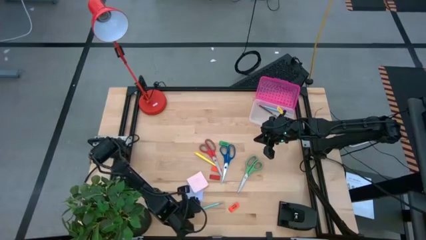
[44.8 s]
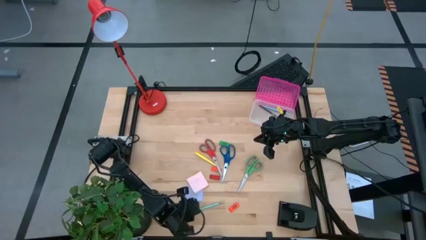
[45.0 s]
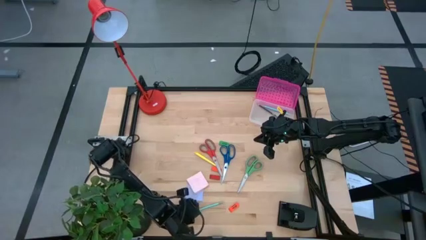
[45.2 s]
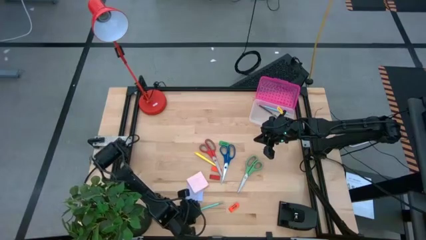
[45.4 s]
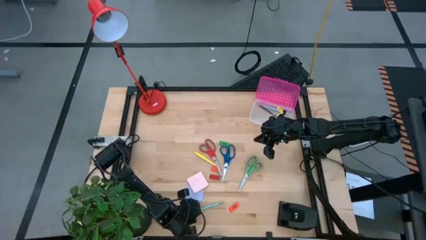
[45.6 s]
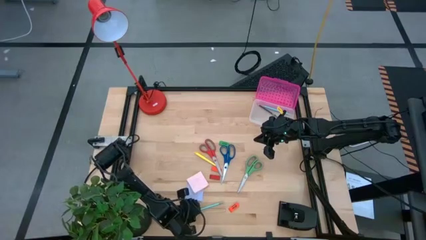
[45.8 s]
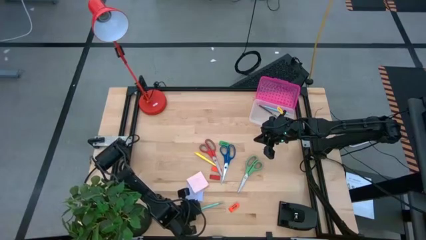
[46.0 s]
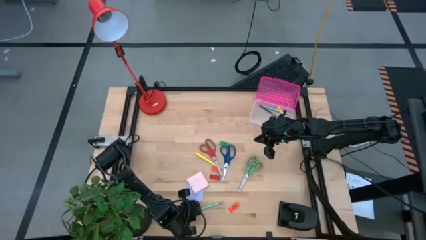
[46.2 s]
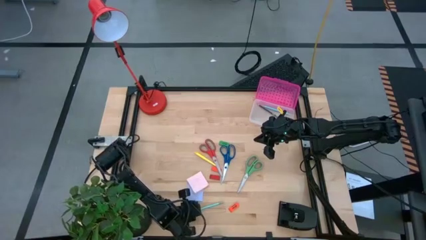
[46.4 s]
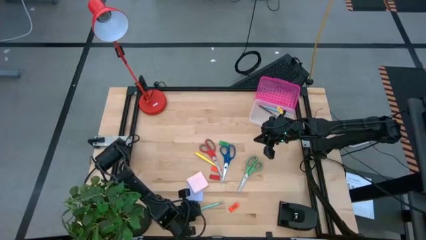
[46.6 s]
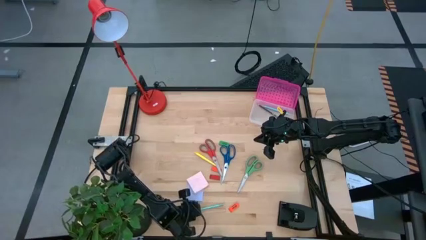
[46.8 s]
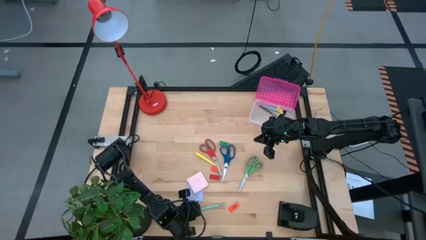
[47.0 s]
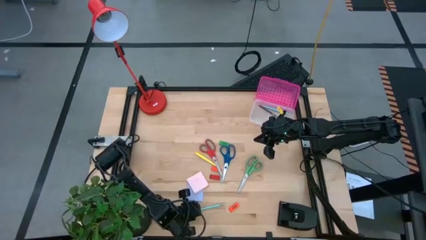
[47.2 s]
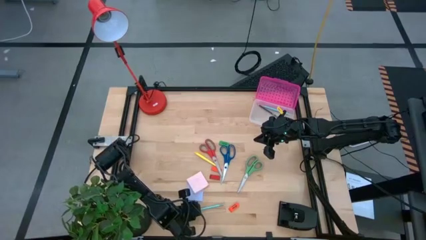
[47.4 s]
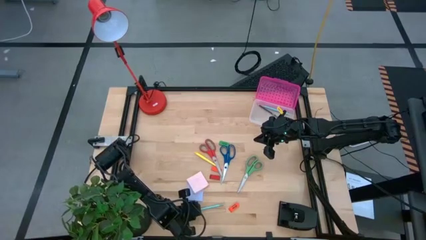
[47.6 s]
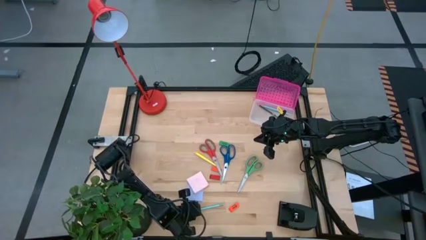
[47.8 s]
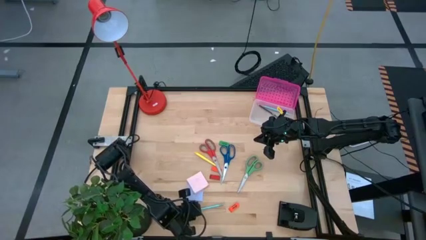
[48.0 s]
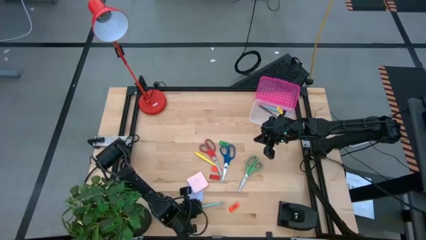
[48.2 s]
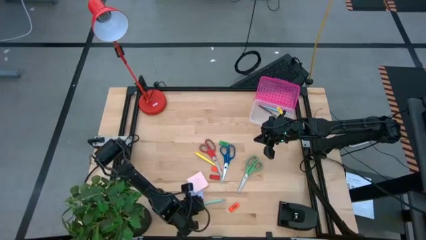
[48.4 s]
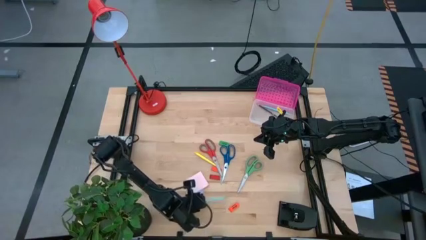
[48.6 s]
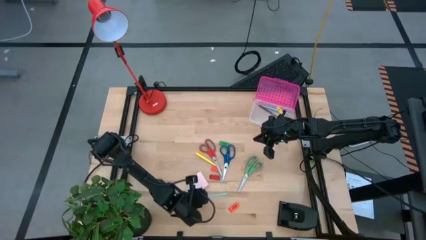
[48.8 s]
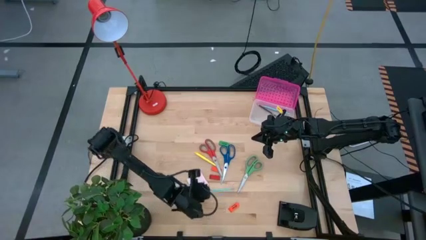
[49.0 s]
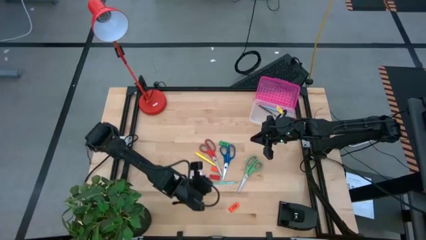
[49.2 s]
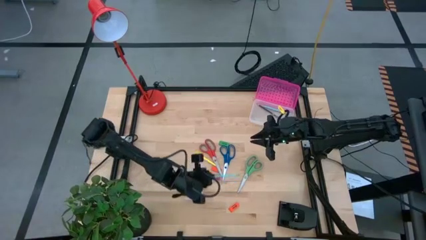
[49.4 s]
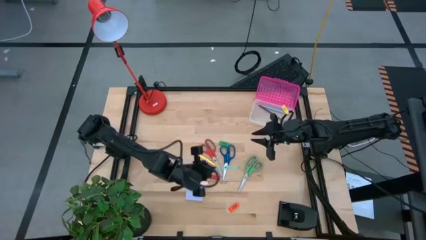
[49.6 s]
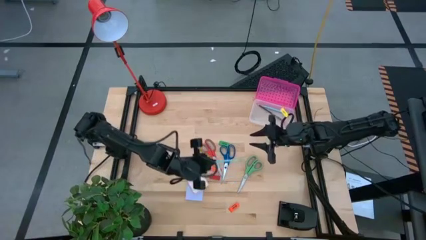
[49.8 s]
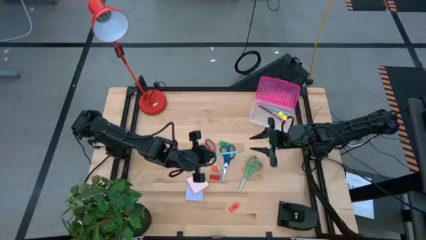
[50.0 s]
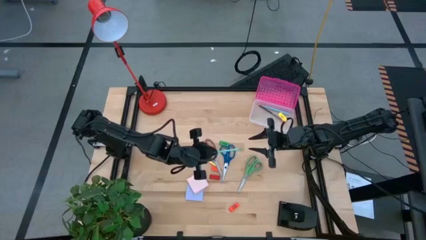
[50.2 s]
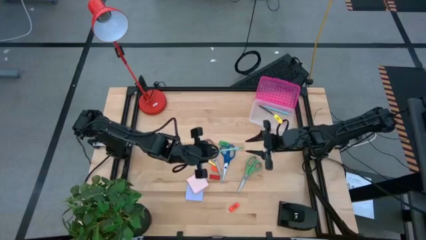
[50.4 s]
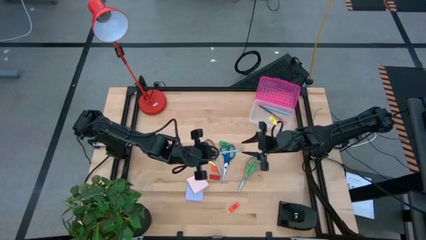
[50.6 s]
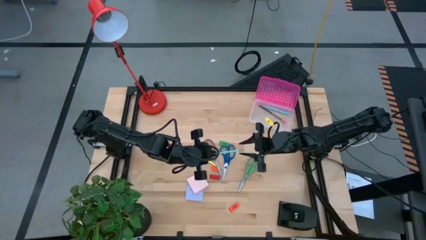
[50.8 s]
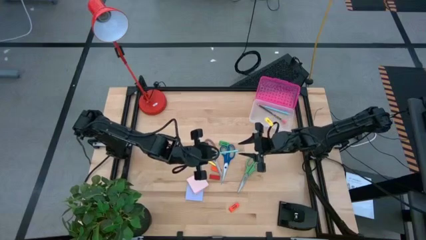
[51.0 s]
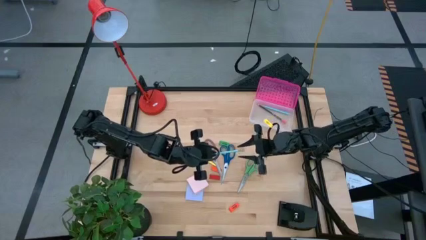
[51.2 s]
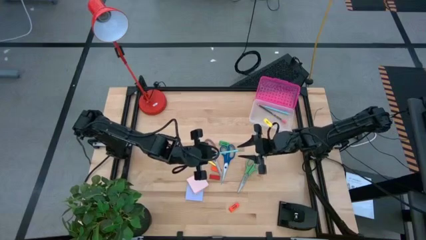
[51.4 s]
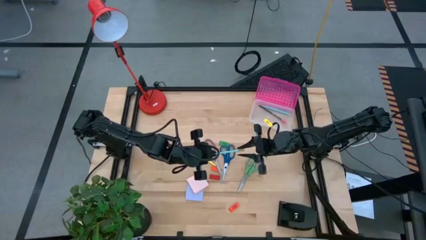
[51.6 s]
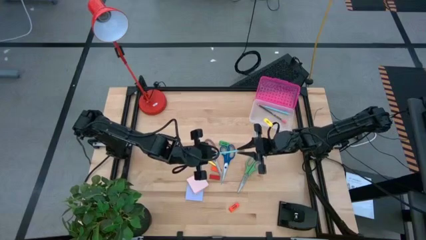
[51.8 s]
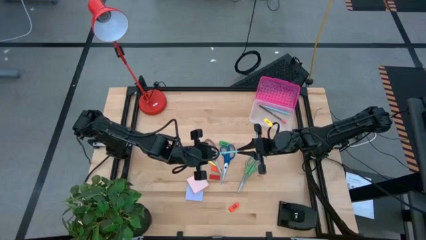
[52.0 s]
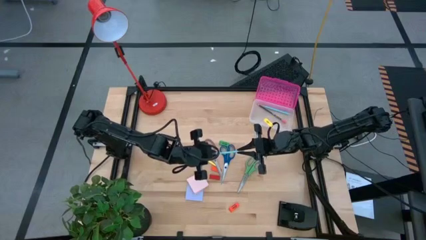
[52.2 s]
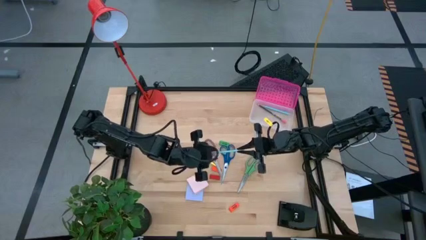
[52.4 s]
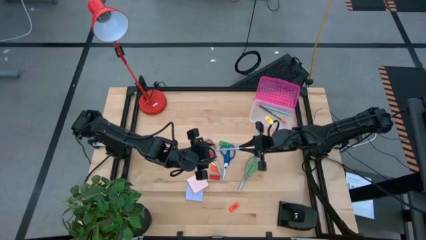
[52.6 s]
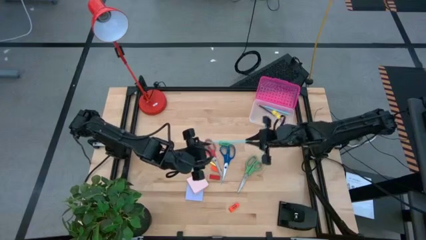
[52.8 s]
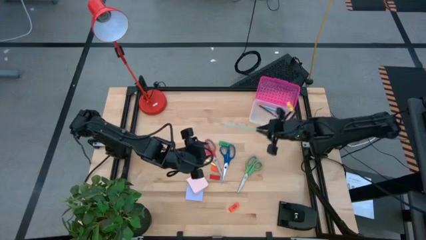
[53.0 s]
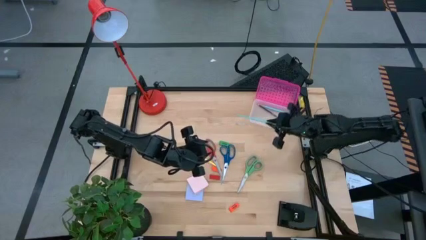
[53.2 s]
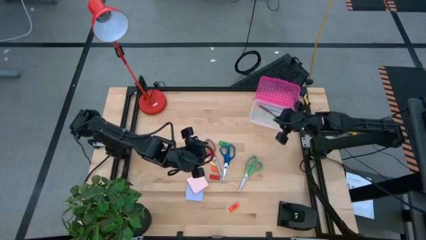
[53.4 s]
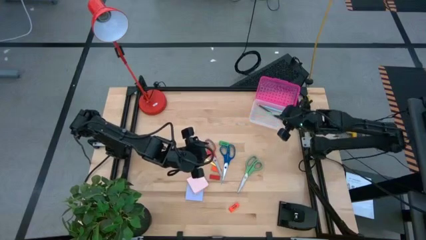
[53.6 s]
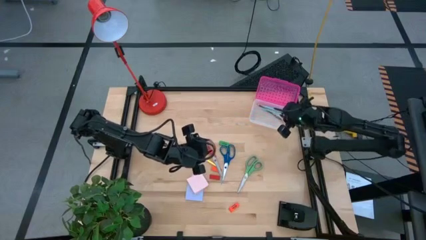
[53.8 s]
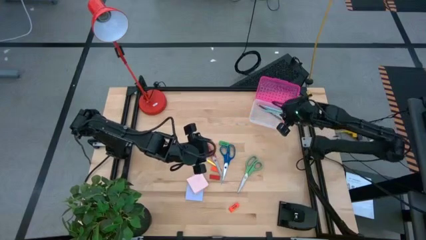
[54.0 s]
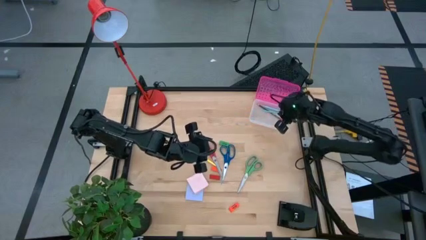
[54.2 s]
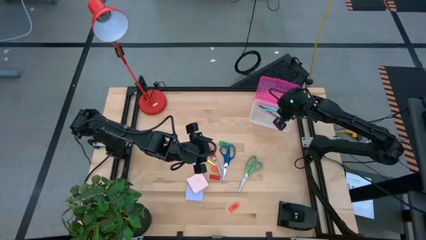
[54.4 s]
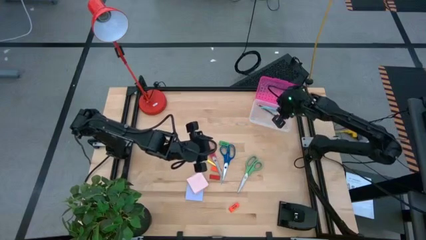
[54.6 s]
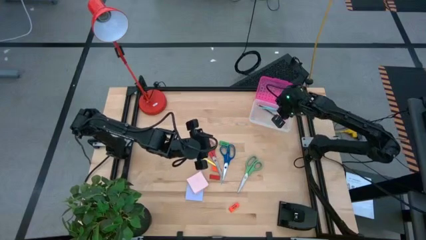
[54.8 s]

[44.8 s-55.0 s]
Task: Pack school essentials
Put the light blue pencil into the supply box
